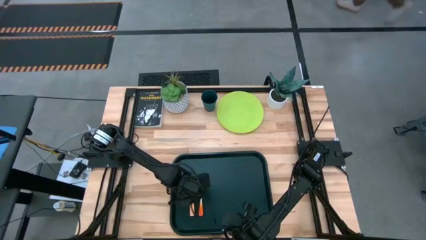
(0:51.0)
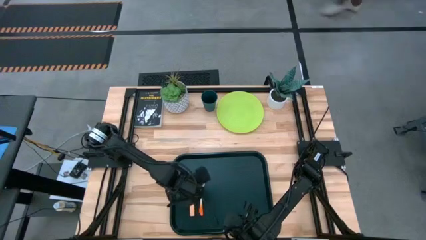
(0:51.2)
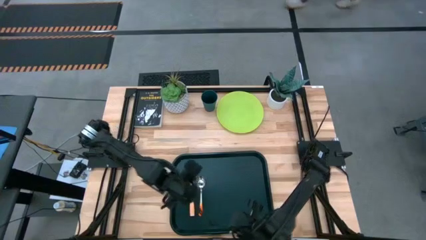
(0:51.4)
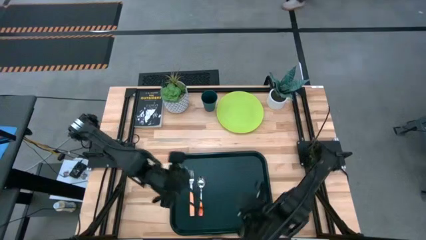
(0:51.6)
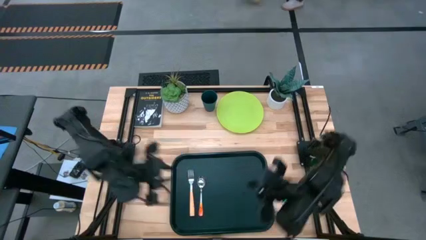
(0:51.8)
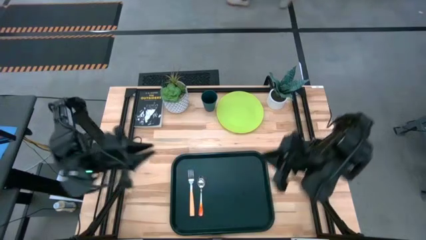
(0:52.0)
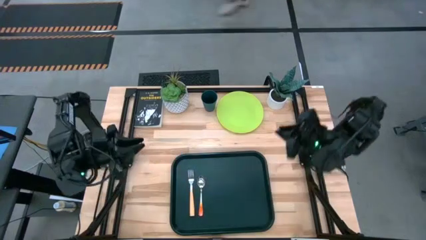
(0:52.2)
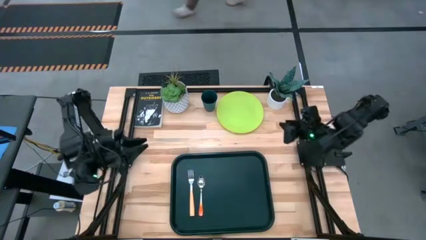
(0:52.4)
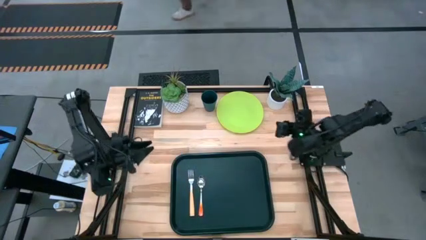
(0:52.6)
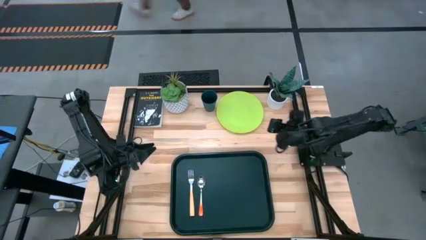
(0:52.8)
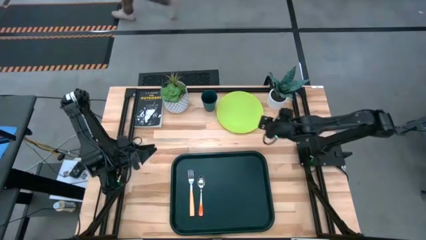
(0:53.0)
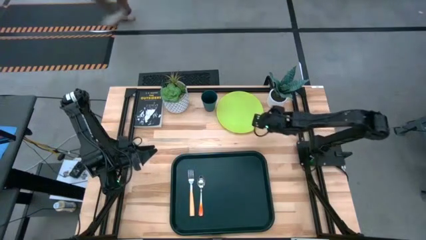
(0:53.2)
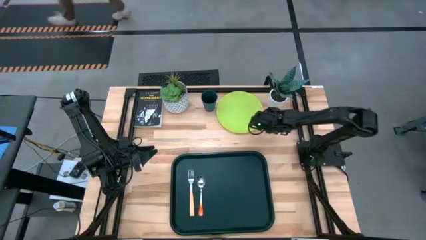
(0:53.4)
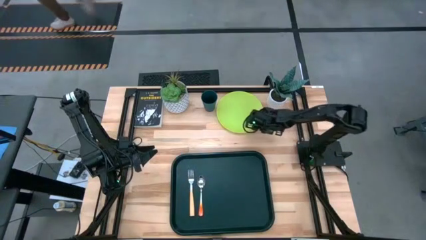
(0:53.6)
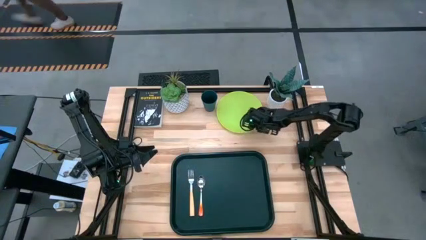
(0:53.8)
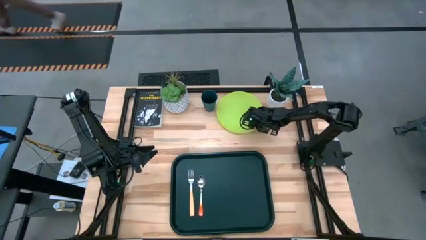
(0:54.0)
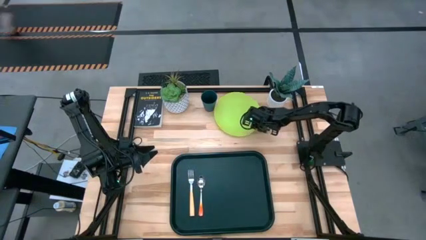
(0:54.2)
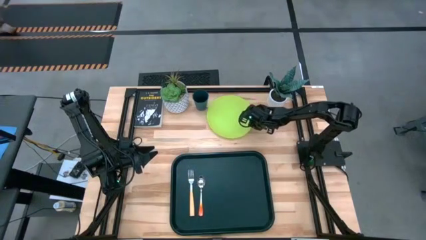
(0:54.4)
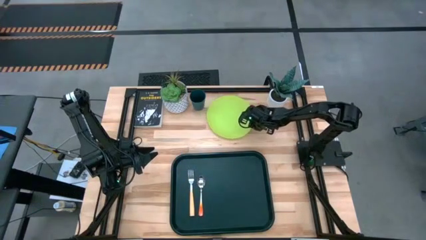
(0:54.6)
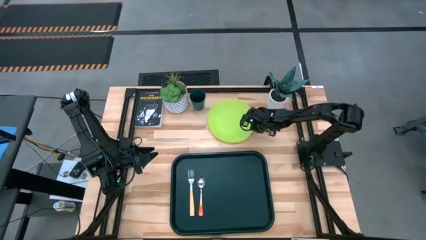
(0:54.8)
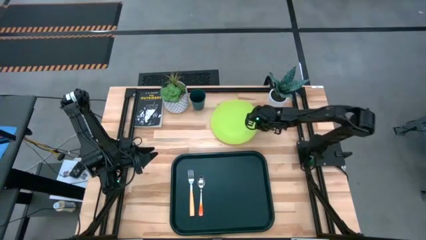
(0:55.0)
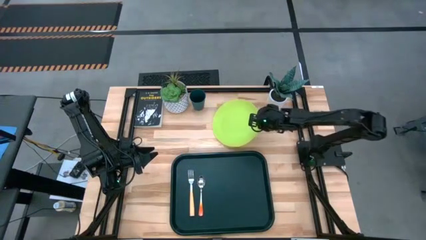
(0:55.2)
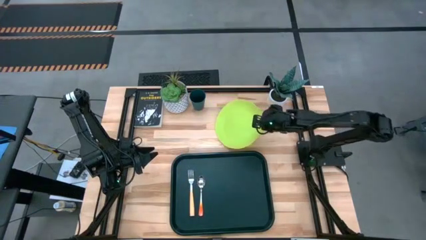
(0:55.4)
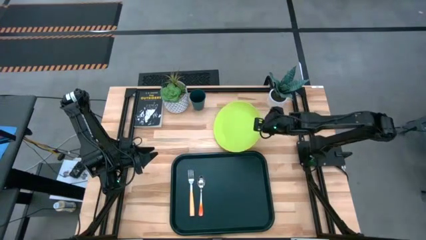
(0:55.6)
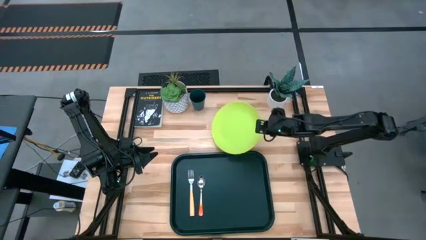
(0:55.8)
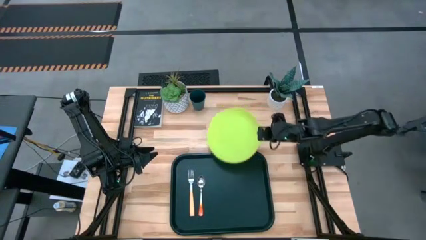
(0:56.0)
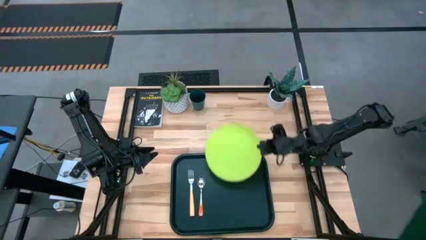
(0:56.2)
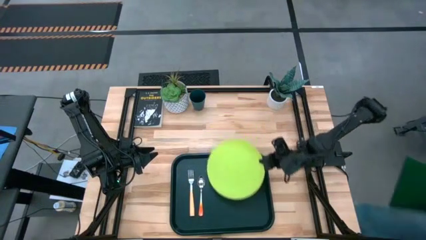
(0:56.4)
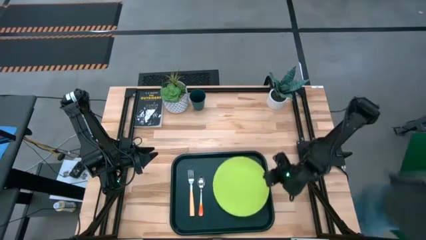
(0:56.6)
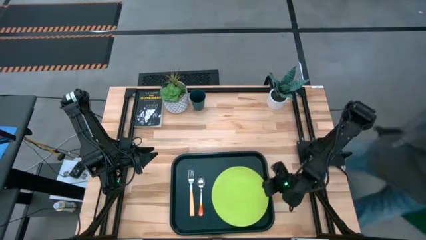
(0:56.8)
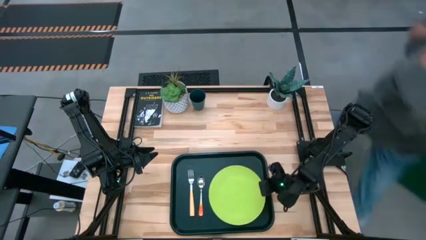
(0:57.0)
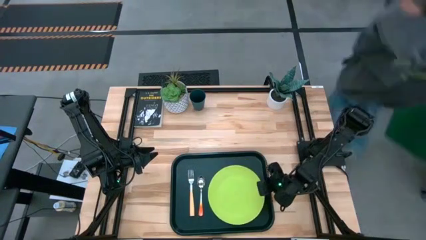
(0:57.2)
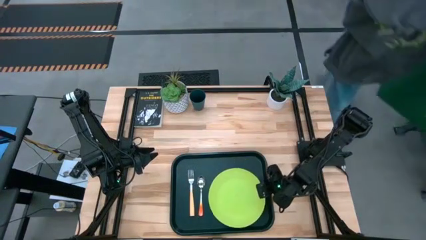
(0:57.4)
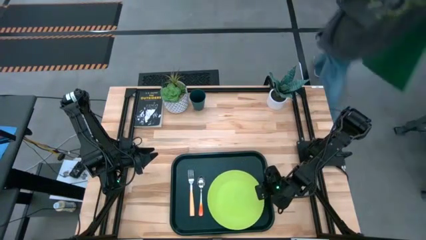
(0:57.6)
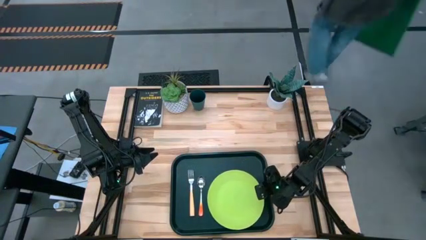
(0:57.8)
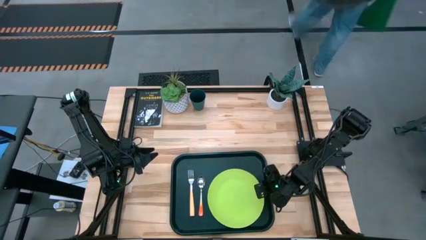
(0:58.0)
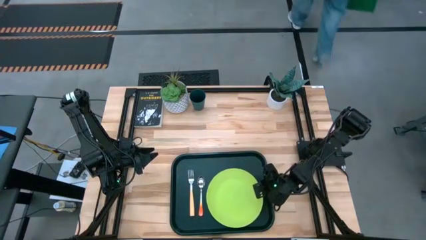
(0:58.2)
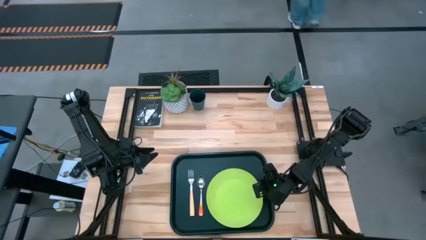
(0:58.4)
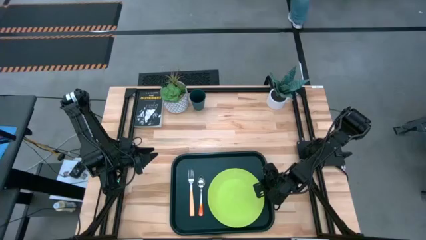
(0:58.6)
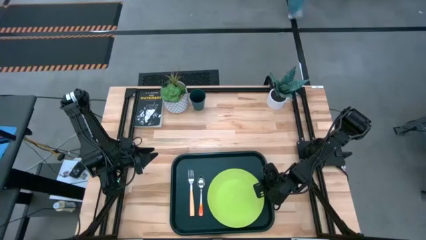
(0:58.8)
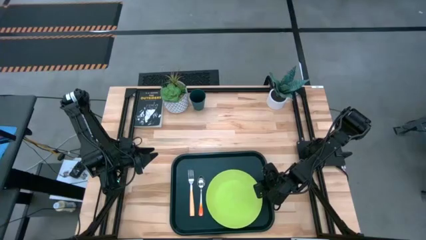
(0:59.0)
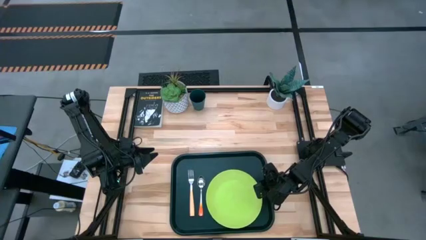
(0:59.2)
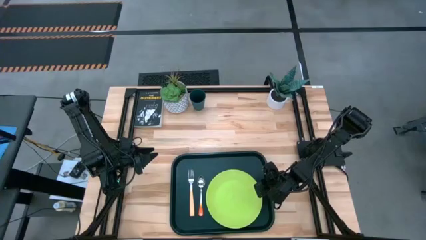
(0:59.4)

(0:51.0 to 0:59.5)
Task: Pick and place plate/cup/fork/spoon on tray
Put the green plate to the right of the orange spoon on the black serving tray

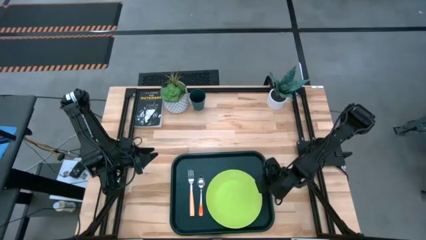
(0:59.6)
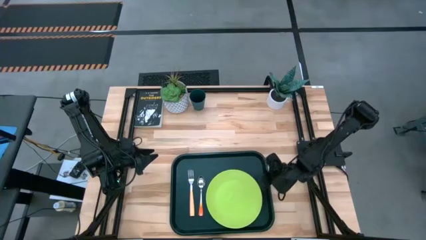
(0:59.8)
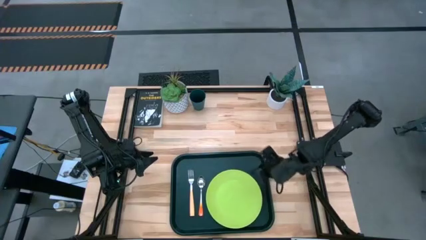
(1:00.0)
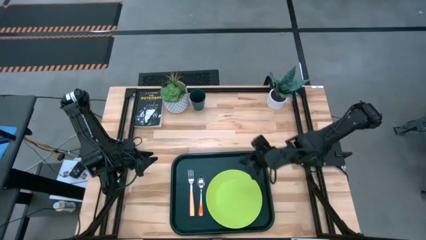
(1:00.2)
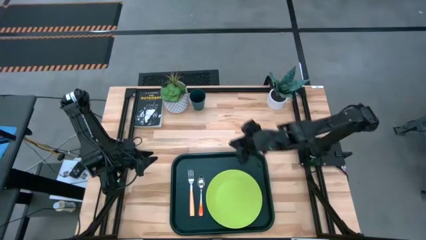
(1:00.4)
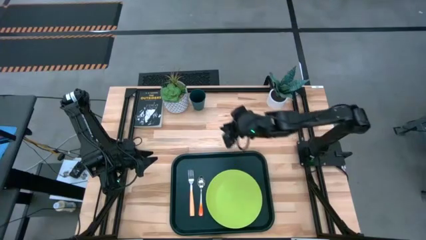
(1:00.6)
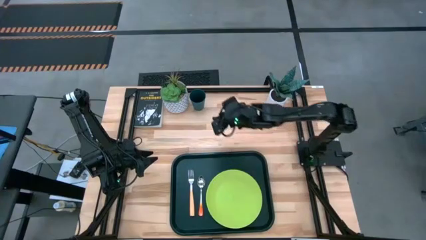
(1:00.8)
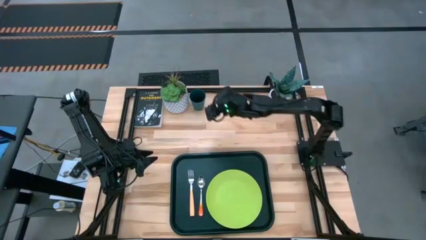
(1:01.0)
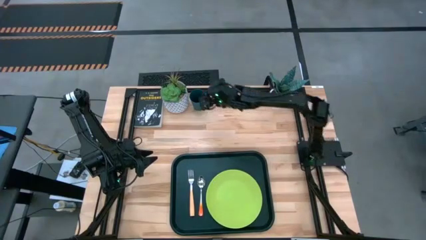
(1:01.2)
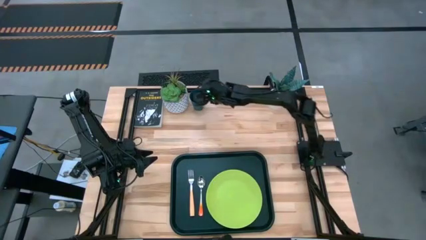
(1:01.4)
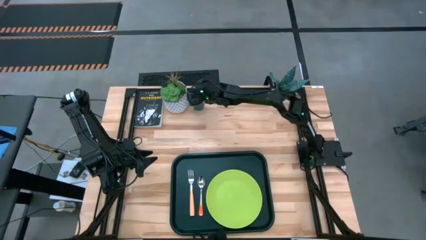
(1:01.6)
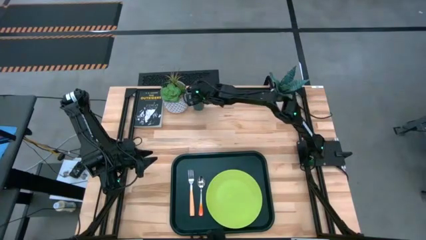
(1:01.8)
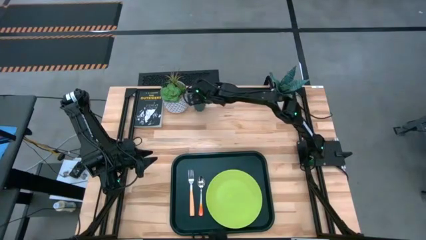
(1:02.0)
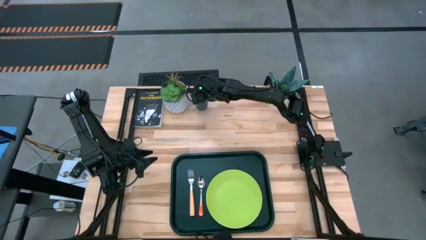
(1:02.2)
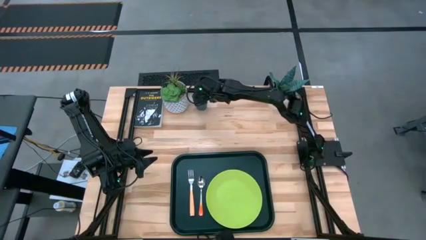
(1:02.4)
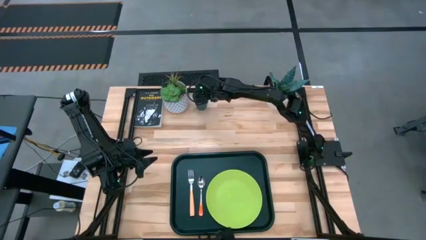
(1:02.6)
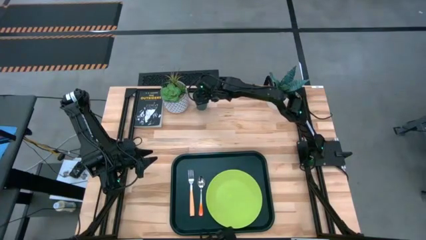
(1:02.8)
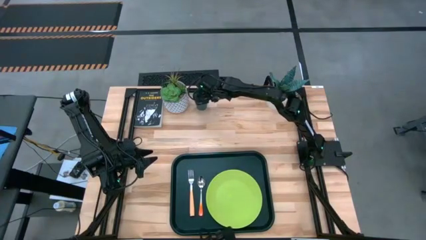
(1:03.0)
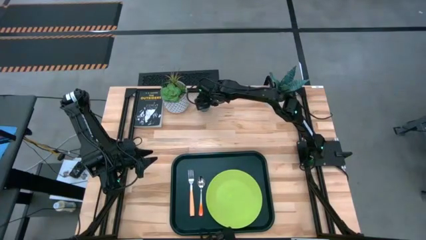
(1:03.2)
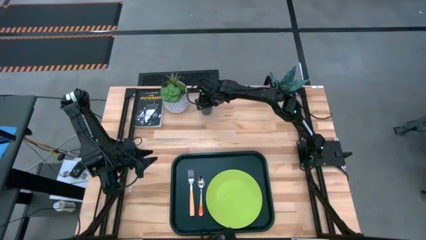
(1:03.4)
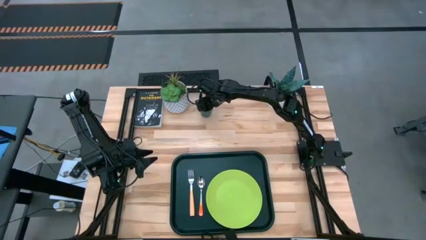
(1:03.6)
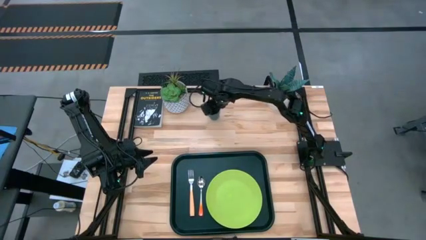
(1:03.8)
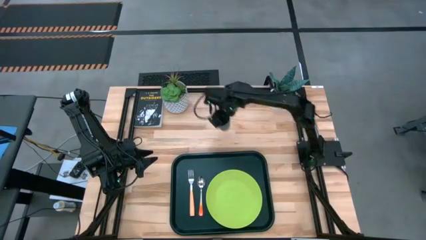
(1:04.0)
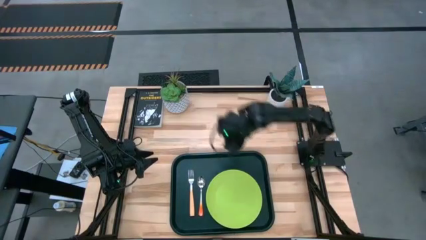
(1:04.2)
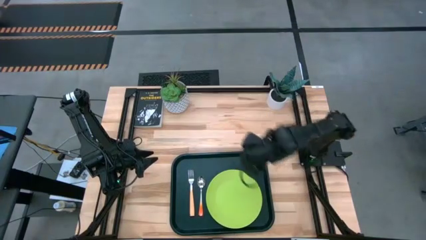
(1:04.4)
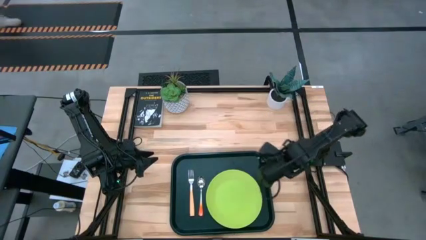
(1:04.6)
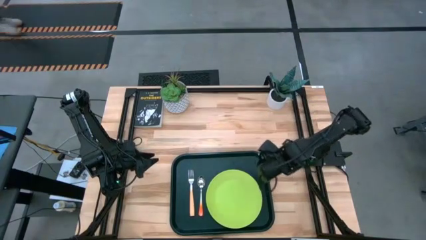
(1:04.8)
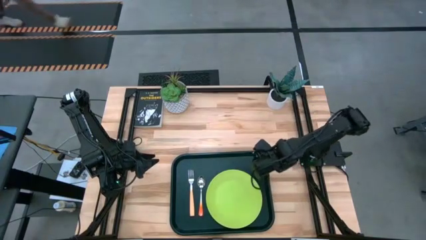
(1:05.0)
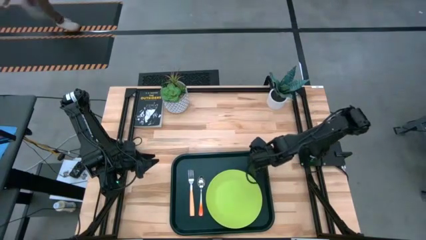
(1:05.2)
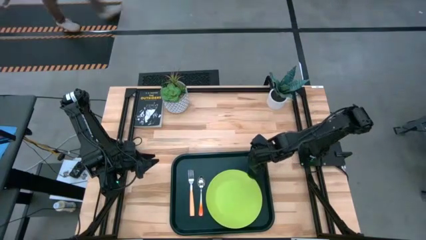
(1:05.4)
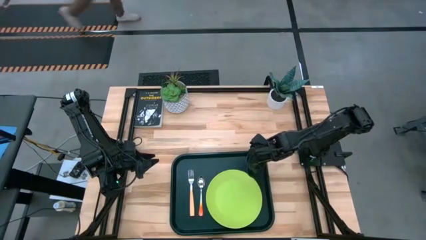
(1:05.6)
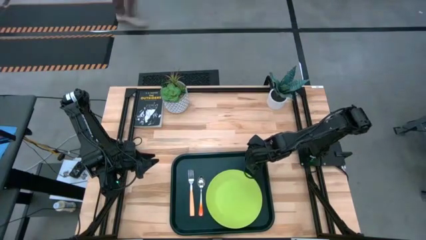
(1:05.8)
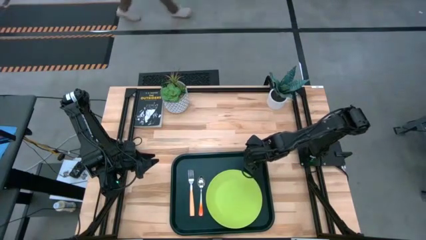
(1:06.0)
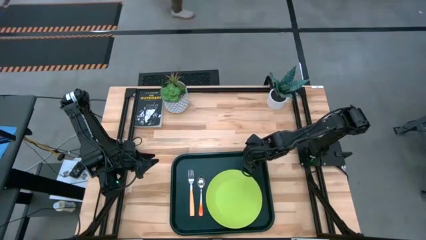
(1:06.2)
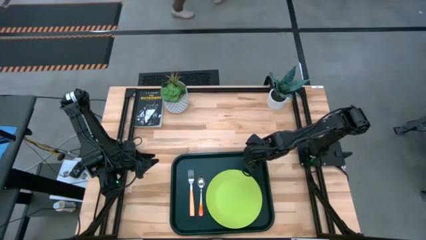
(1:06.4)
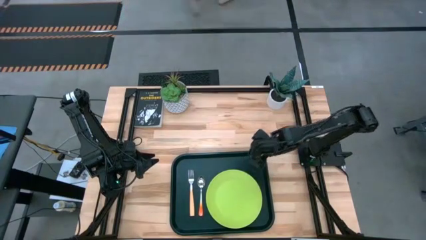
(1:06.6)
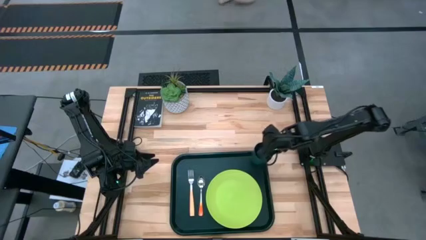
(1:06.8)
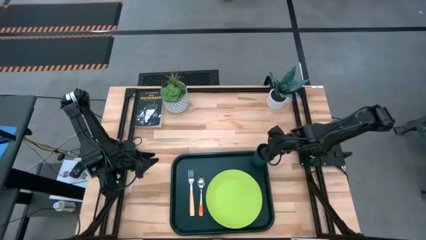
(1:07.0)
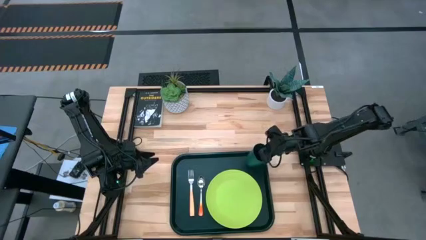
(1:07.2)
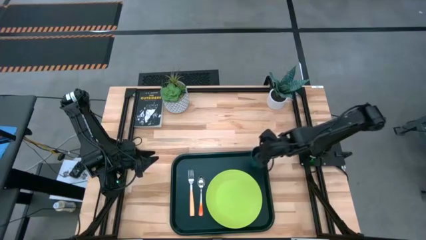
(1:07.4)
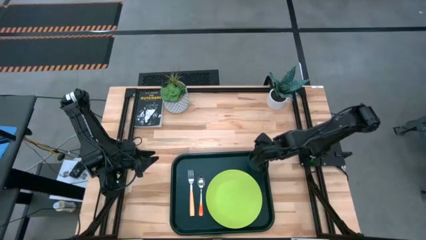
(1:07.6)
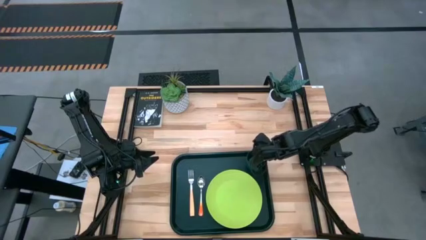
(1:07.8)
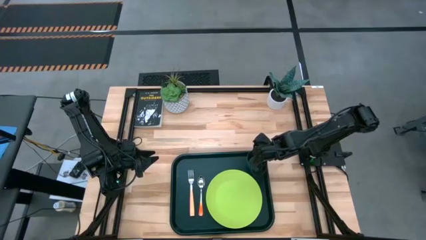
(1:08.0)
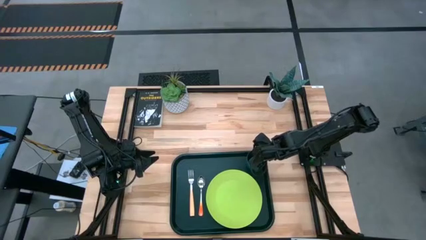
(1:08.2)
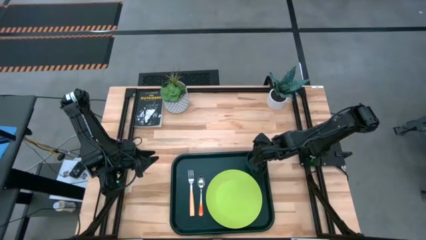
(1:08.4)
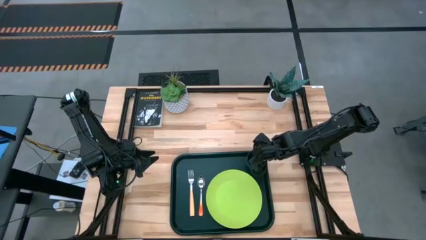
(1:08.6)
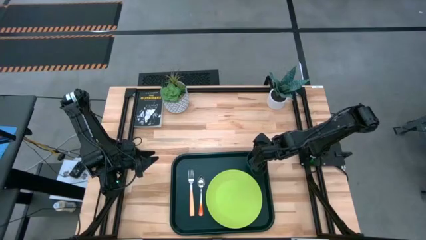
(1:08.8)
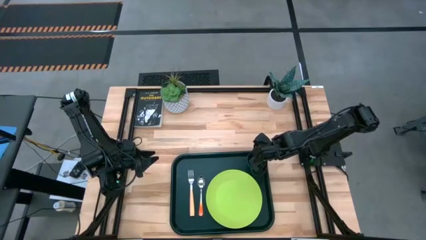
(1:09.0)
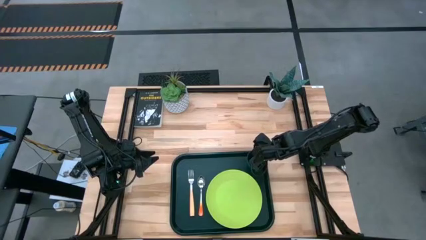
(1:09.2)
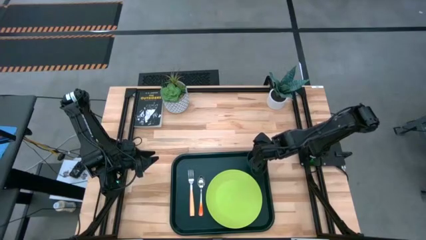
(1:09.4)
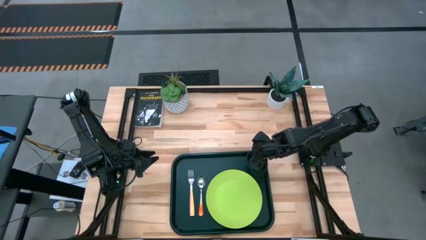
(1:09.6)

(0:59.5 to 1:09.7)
Put the dark green cup to the top right of the green plate on the black serving tray
